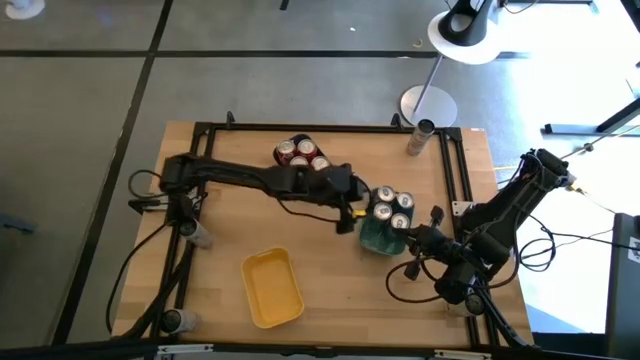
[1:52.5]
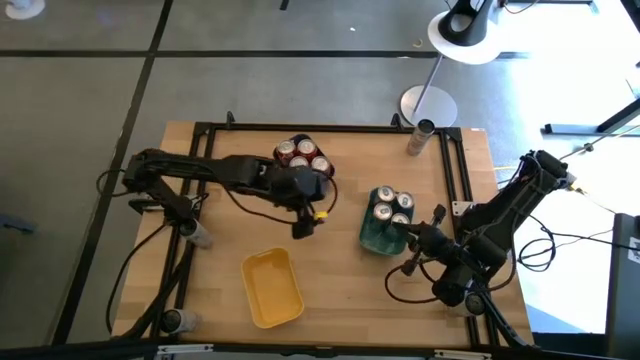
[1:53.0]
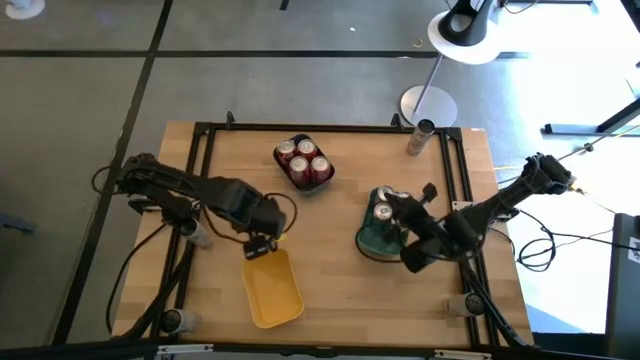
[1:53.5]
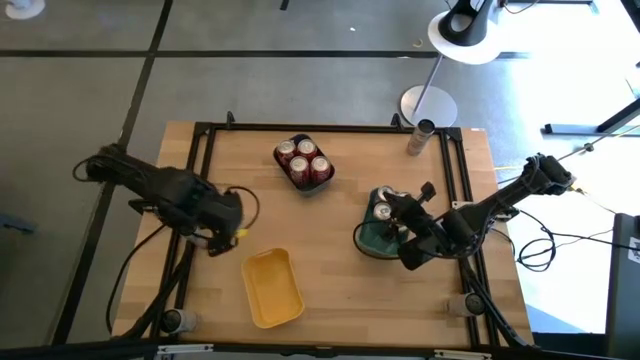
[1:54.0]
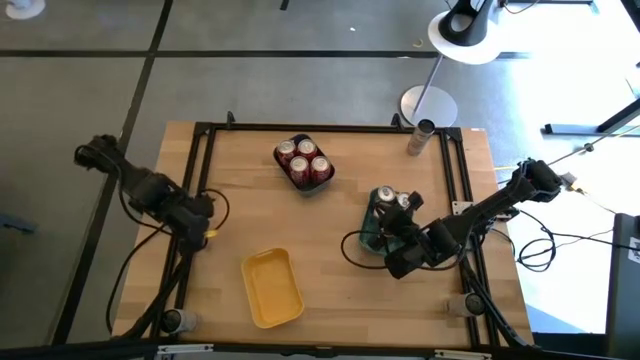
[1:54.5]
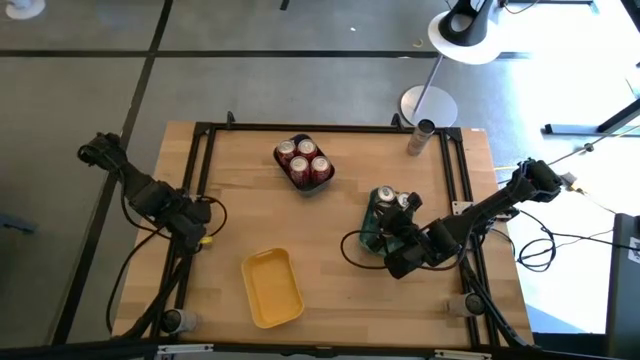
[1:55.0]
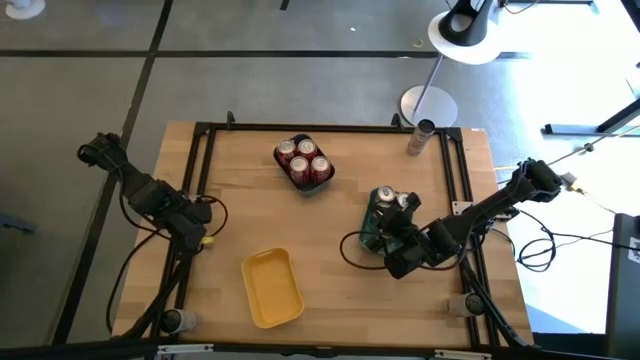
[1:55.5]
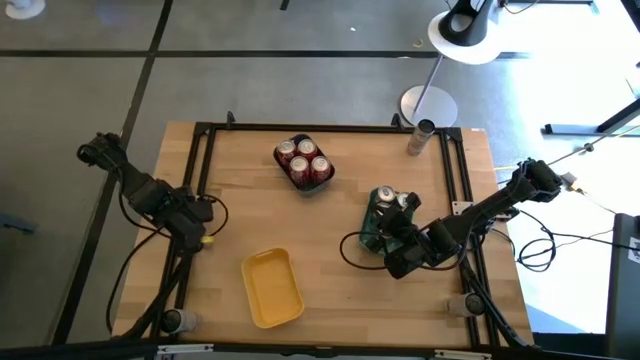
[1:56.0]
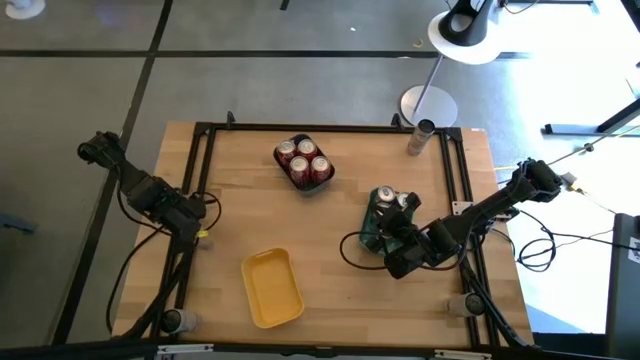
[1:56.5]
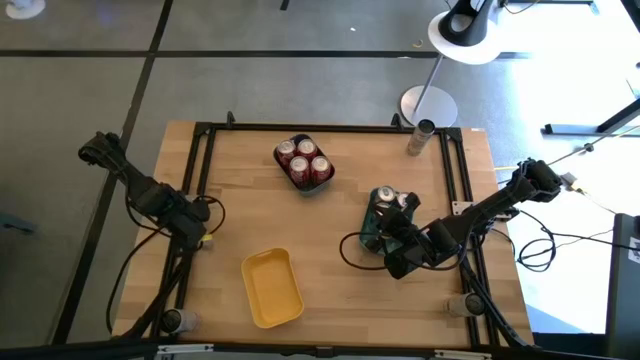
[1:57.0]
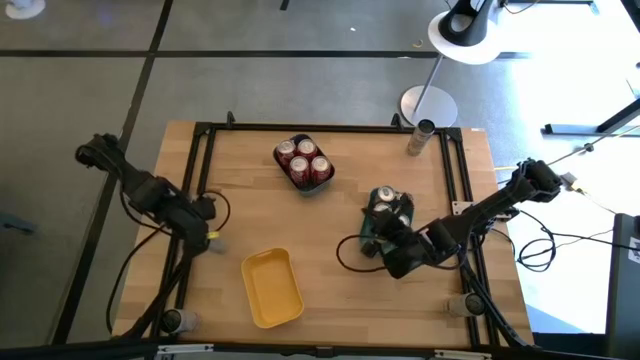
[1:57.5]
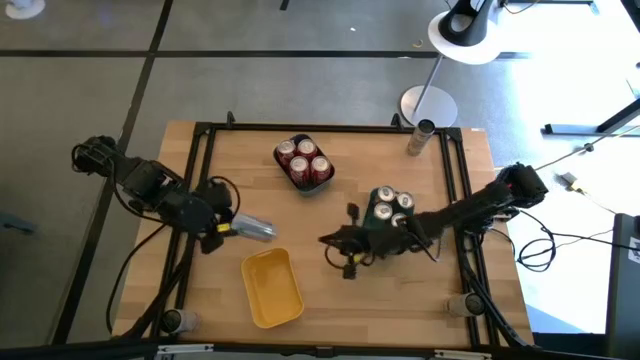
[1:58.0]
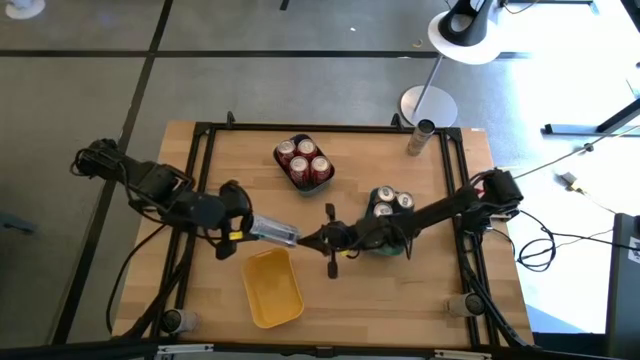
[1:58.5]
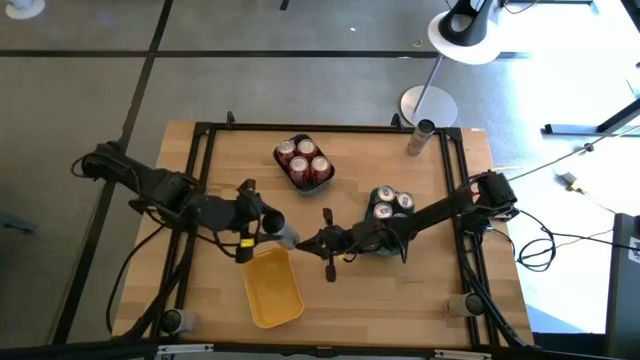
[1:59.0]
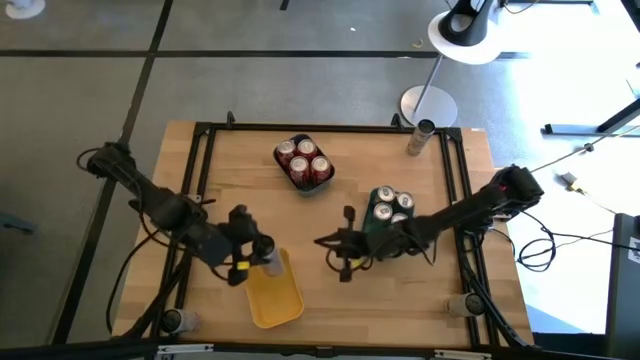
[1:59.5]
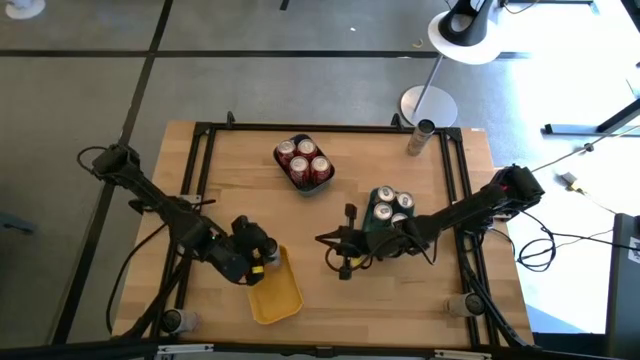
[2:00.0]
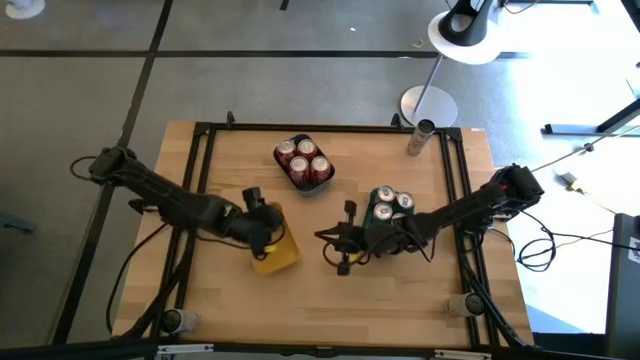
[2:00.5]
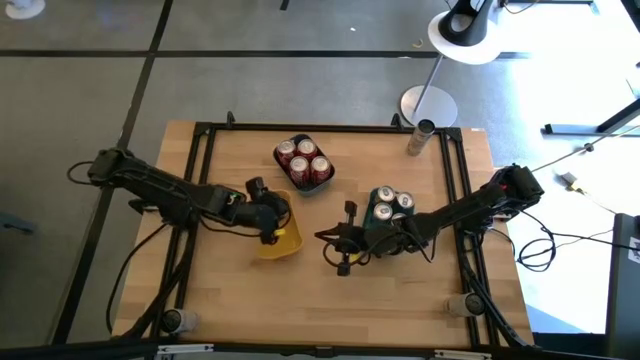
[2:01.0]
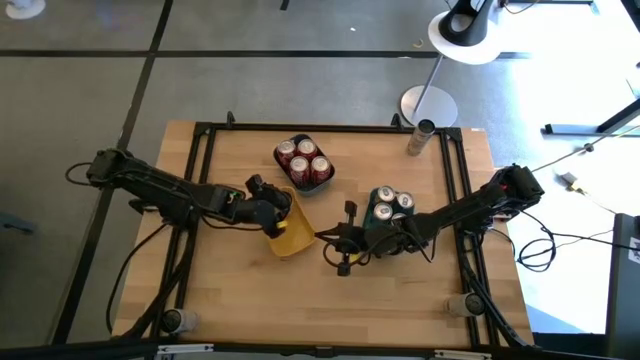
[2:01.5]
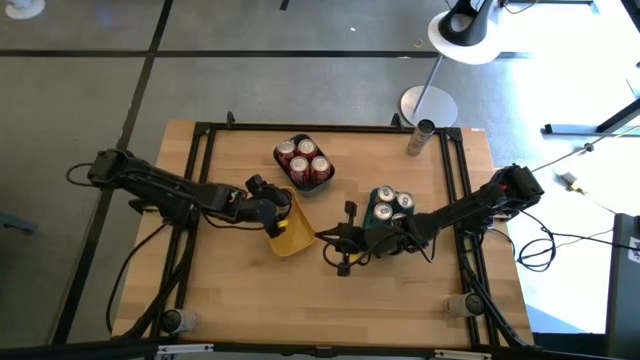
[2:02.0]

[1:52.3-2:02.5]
Task: Sort soda cans
Put the white and pink soda can into the yellow bin

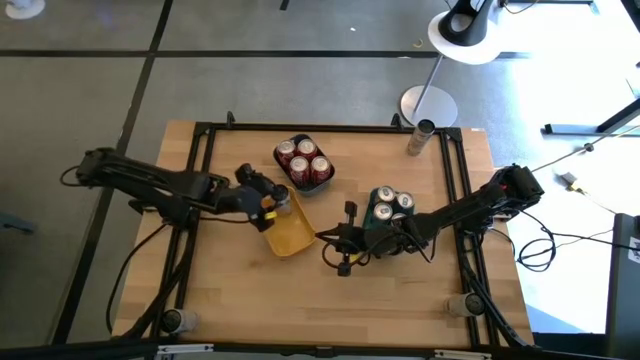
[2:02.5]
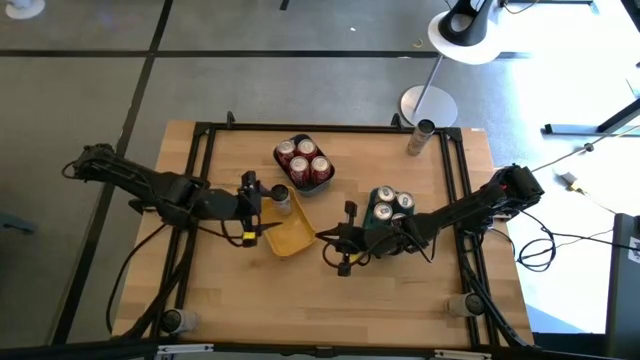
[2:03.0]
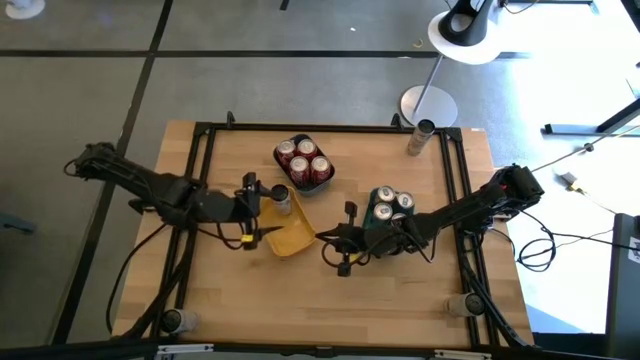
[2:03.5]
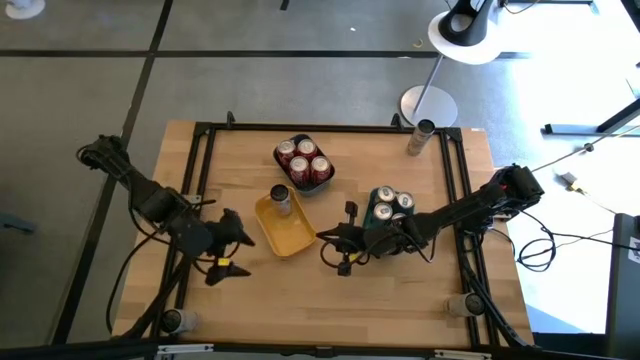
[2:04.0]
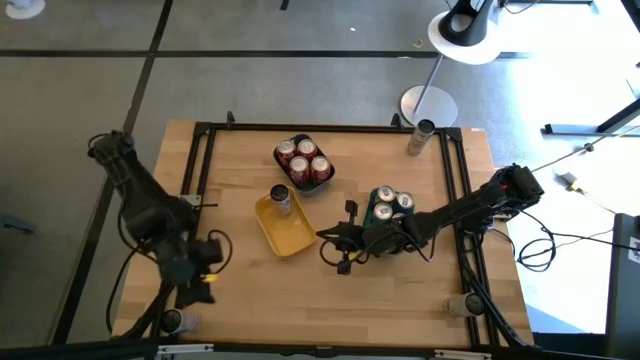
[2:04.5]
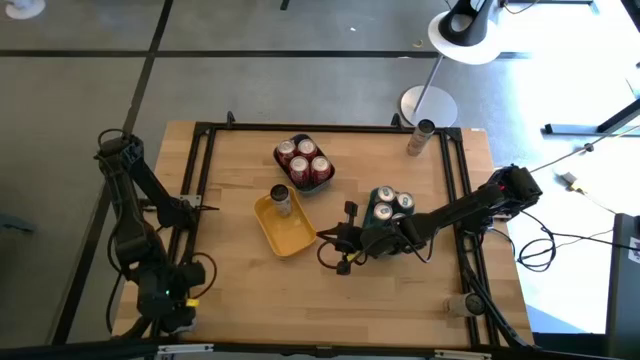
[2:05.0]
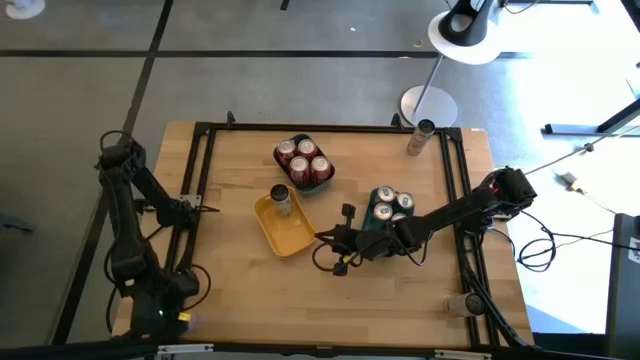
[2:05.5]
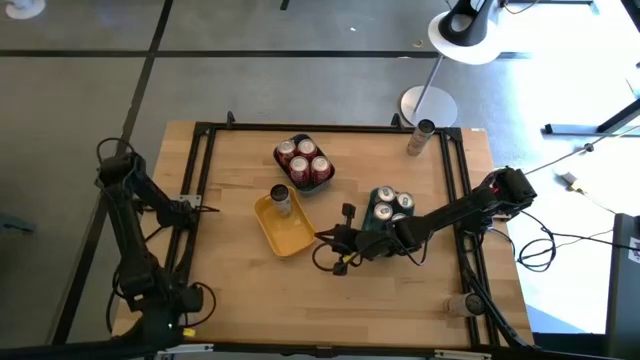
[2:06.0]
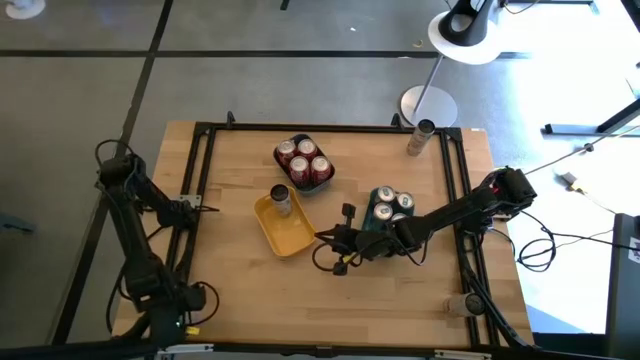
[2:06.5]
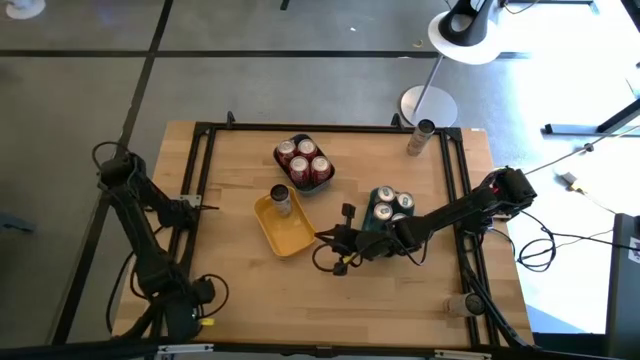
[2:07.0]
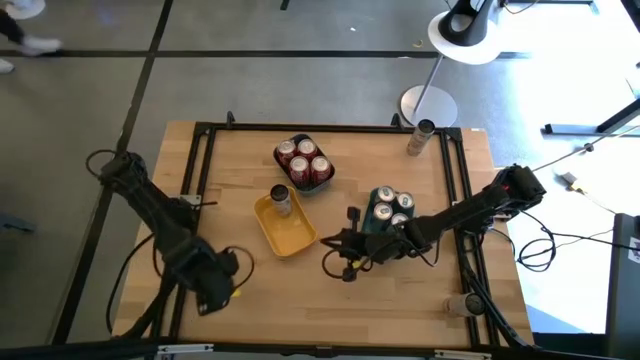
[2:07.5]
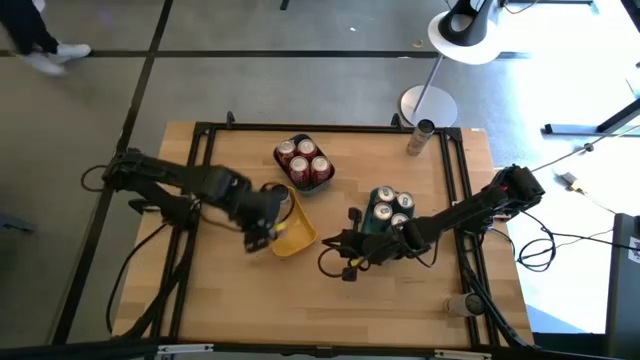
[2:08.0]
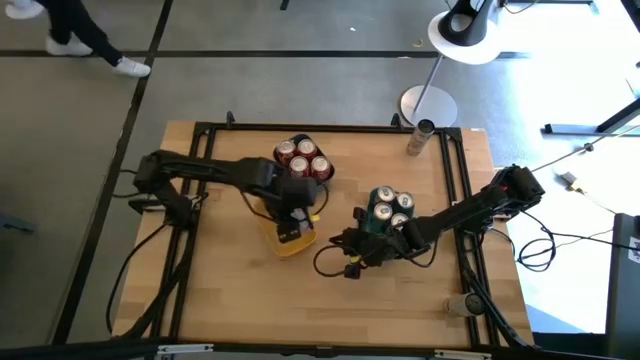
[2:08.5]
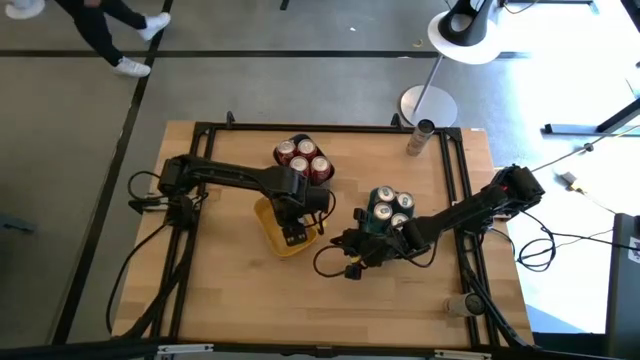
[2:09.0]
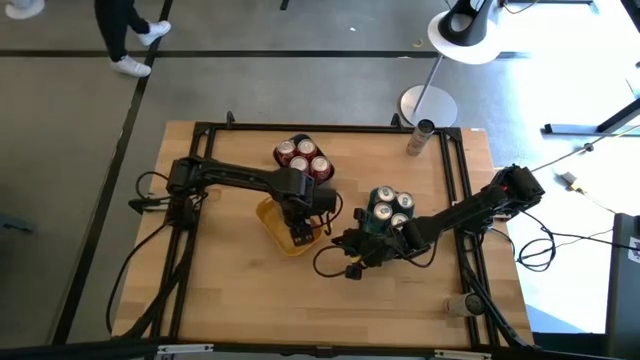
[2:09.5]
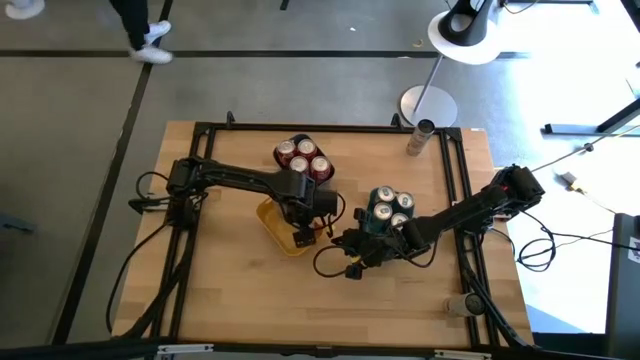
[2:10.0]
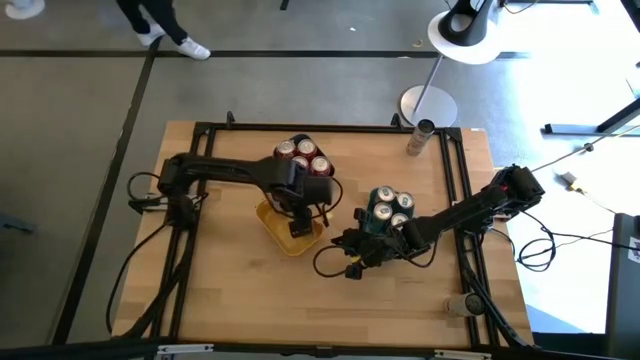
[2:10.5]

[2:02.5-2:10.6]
Put the white and pink soda can into the yellow bin
